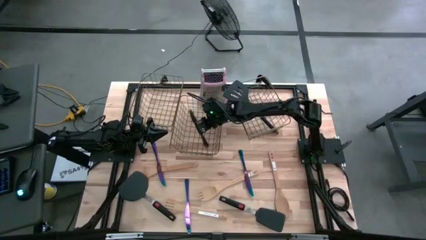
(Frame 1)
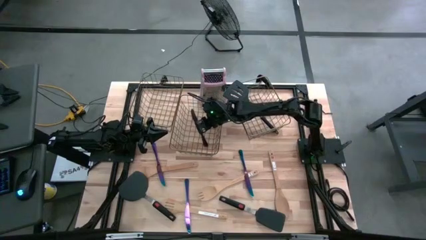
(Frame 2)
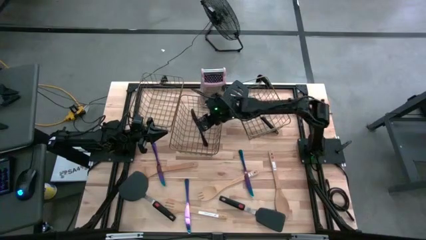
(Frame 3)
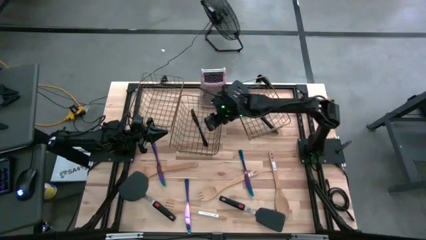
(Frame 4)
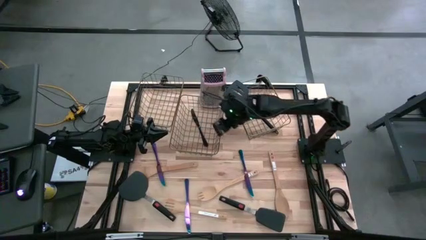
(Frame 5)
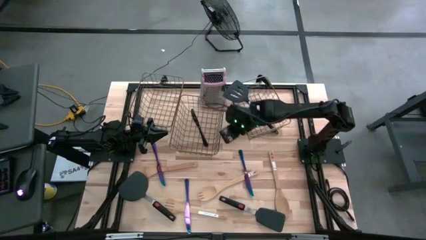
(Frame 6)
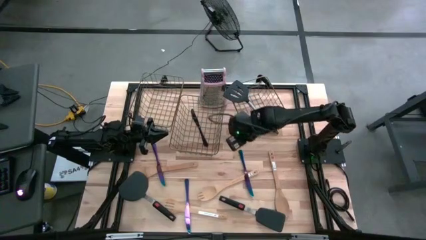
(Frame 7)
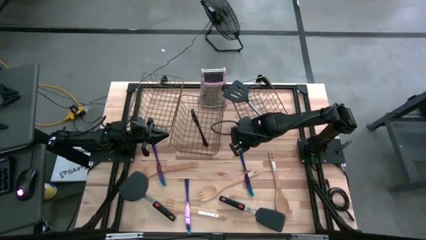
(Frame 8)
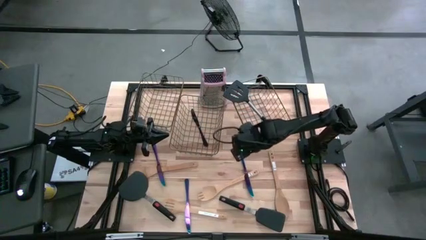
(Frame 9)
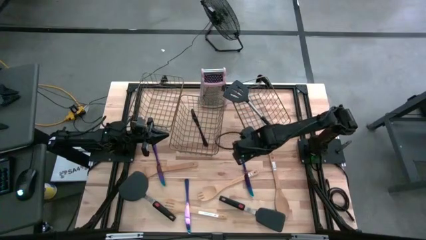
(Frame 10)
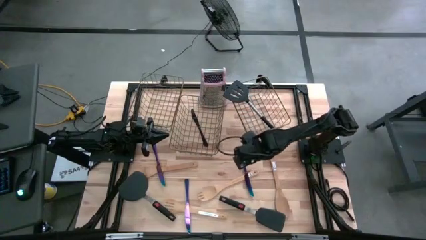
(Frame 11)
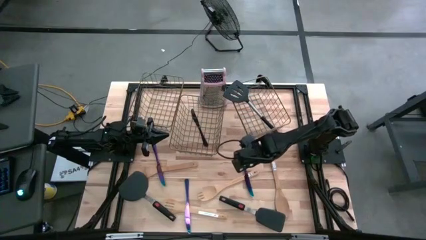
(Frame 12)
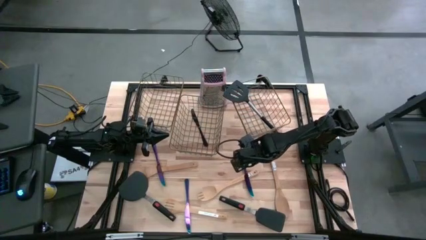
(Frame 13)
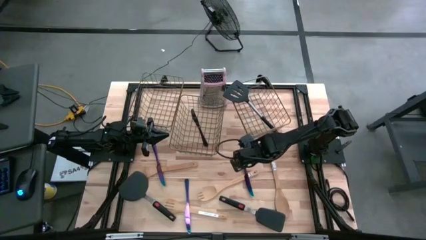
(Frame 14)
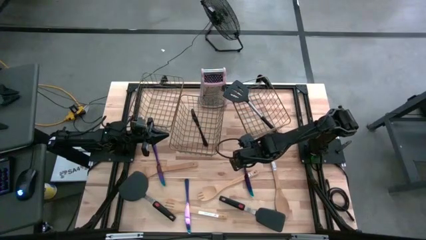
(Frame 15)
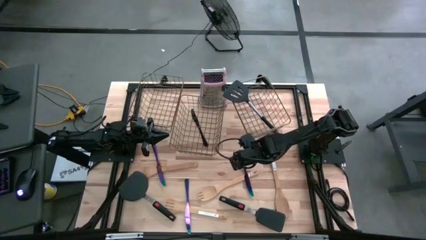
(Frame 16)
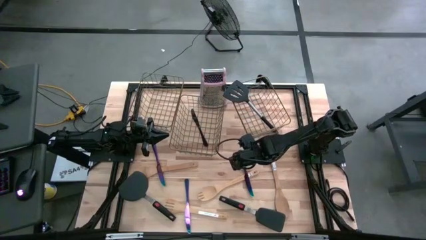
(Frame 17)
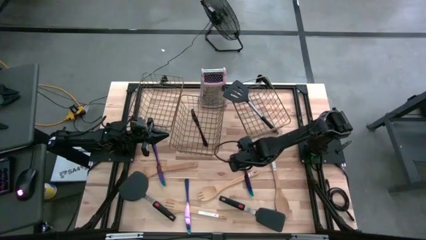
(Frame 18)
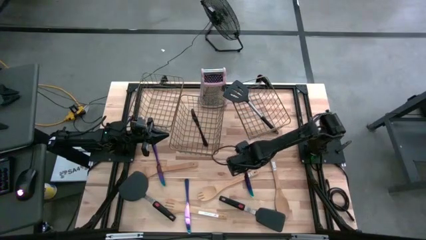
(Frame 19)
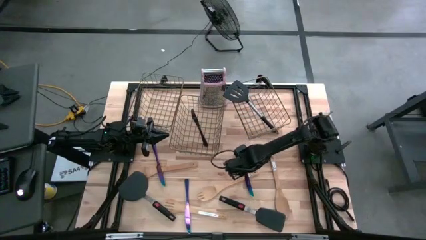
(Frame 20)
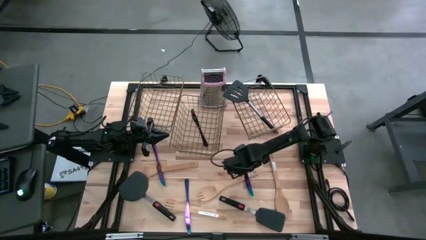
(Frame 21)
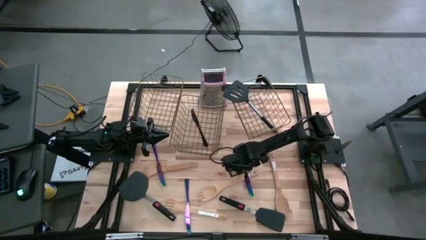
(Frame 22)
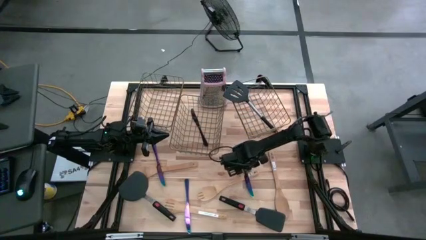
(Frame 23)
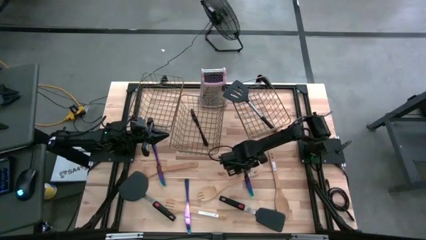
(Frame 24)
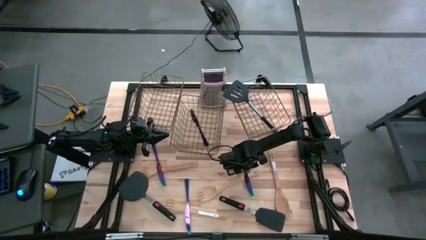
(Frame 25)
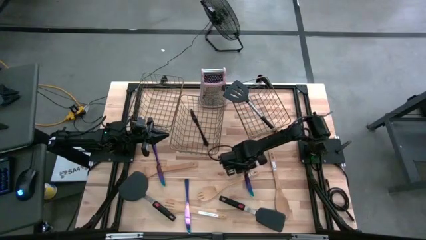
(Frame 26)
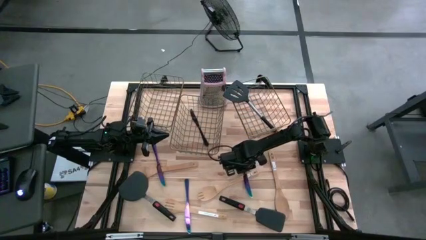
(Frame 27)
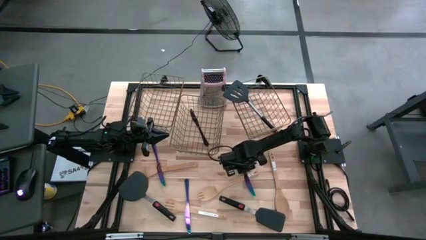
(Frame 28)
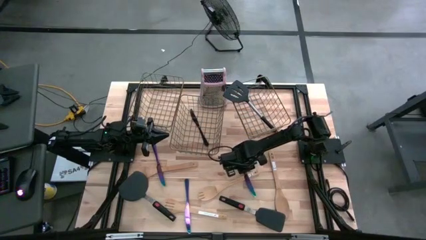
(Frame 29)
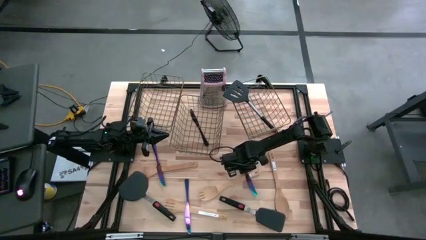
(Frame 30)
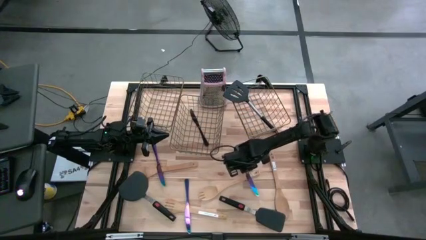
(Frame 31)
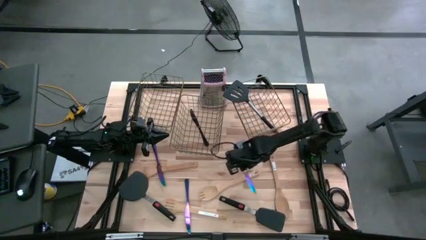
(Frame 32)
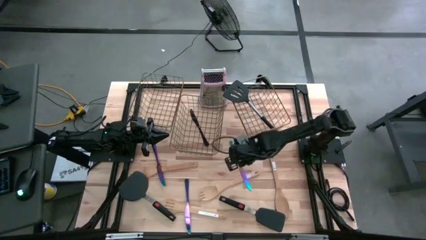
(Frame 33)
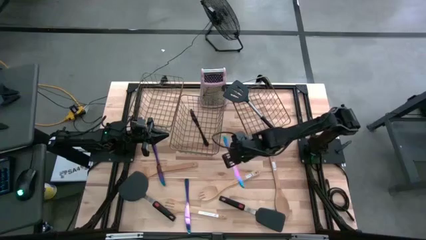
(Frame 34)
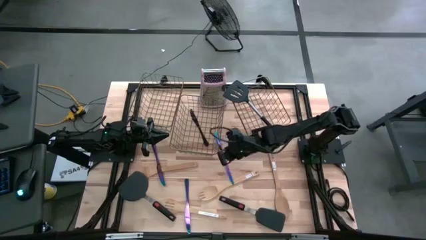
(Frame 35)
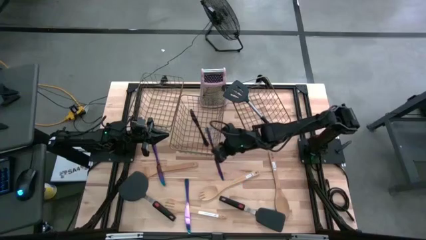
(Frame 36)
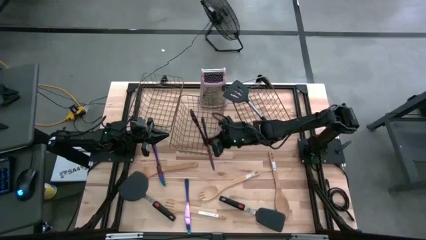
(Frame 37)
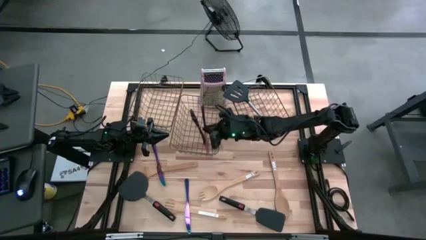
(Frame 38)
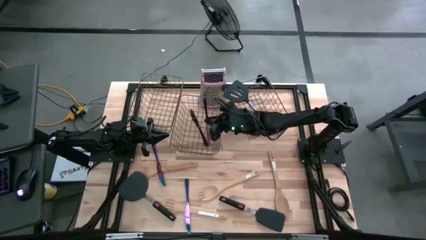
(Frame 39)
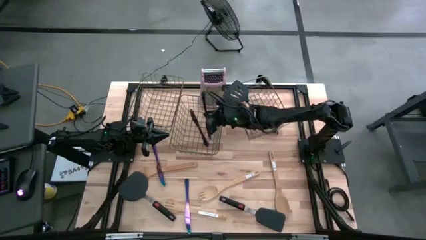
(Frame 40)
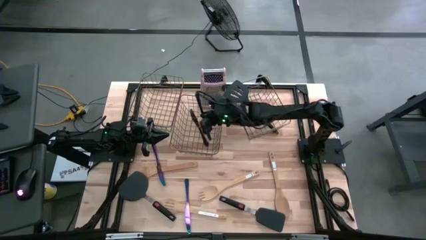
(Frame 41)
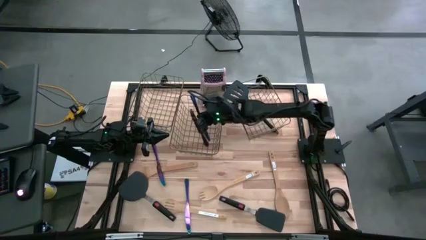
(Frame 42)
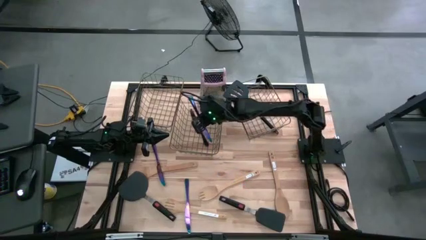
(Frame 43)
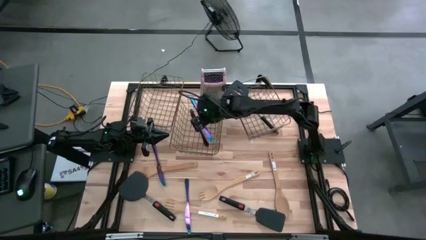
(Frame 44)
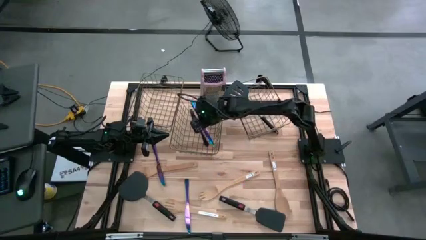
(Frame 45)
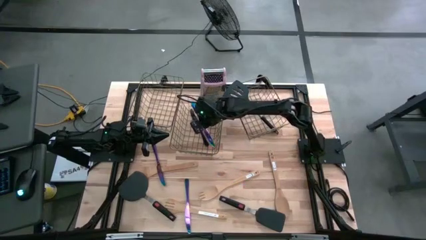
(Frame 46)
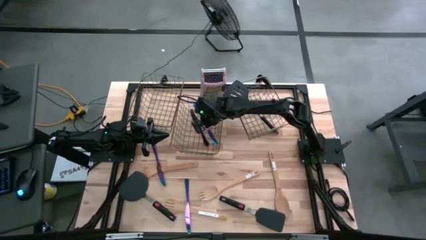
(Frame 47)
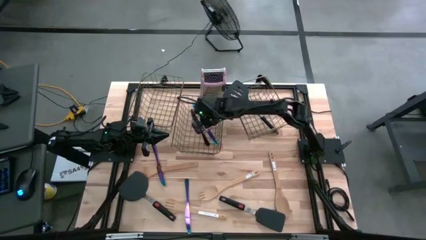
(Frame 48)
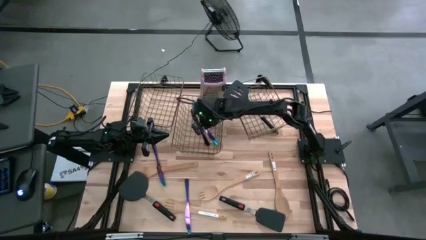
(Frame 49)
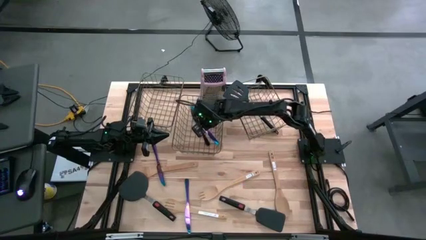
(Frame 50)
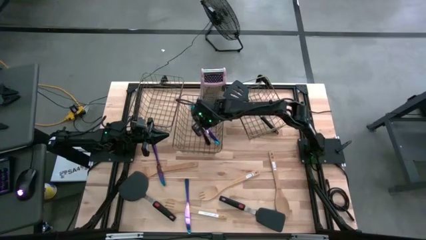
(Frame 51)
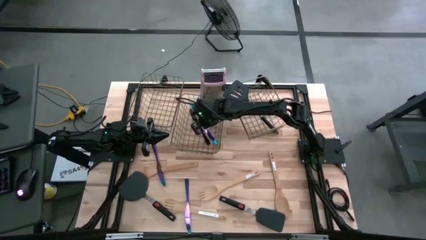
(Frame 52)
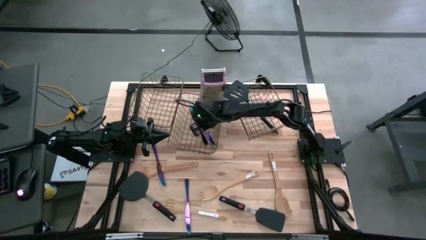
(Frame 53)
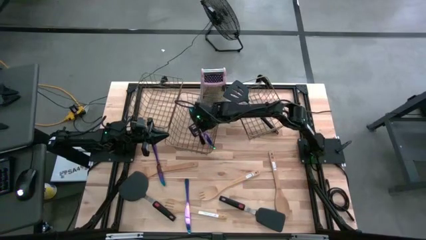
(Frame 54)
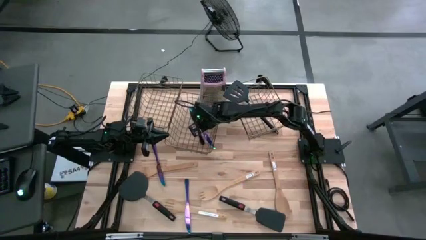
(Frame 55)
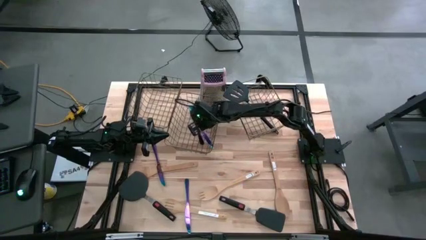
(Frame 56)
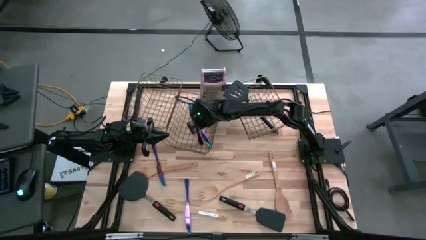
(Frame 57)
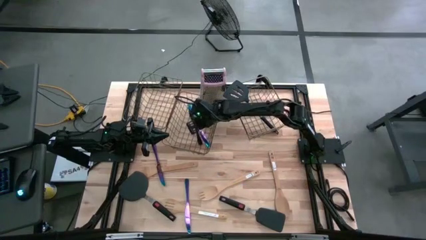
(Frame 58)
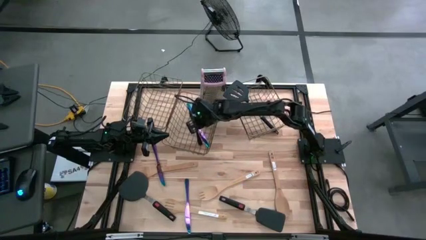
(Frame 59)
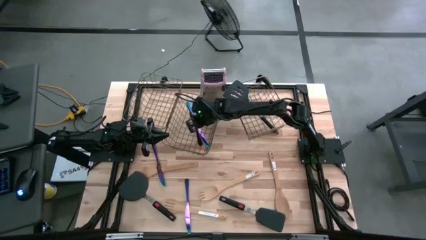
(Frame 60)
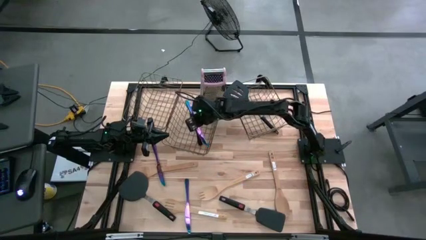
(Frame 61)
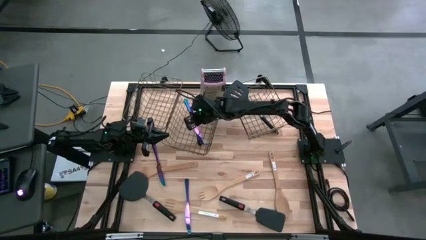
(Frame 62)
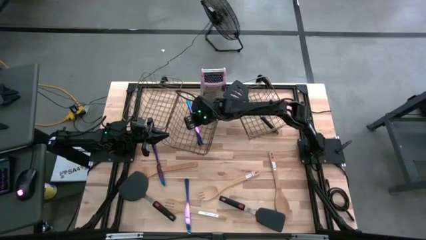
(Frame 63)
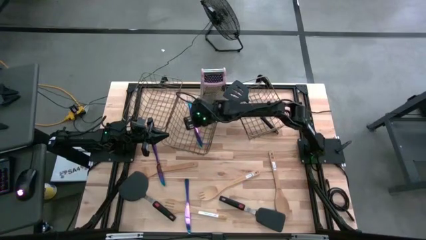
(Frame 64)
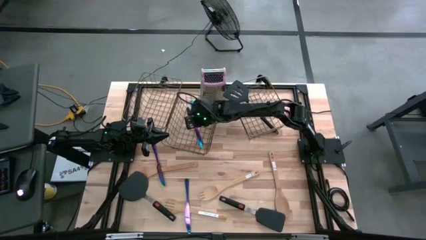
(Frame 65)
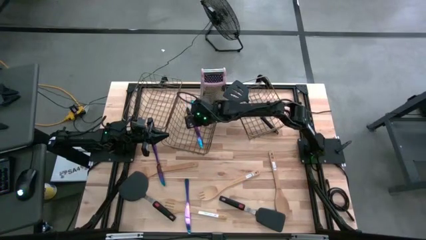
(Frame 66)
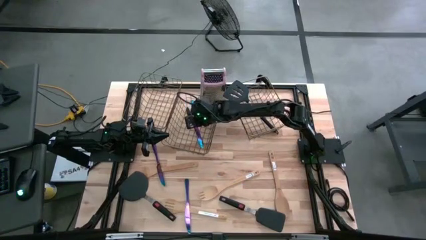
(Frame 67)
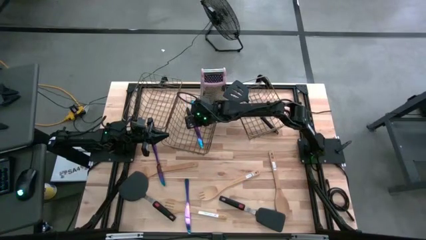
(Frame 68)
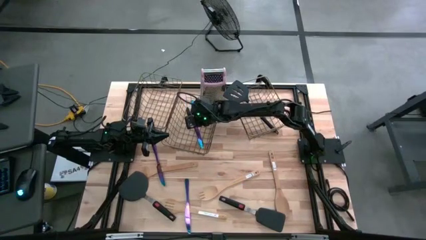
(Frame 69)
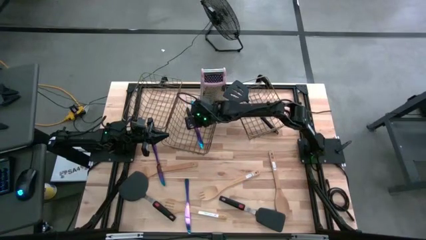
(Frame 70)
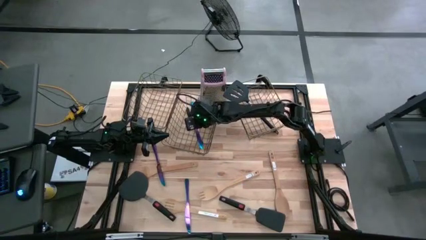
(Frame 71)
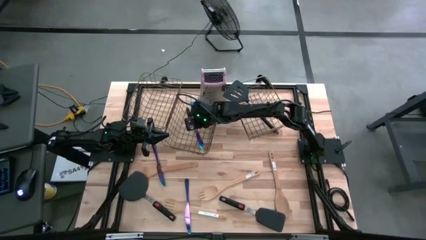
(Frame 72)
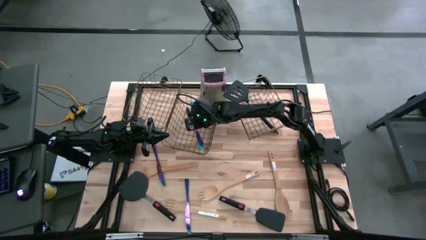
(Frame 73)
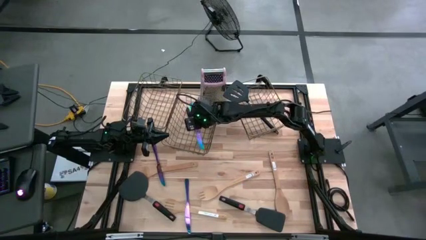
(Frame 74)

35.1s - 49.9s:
Task: Pick & Place Kitchen Items
Put the right blue table knife into the middle wire basket

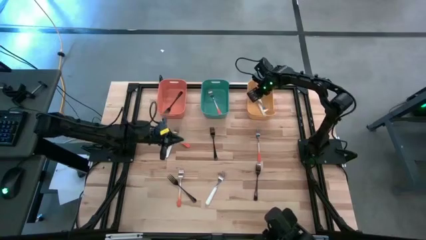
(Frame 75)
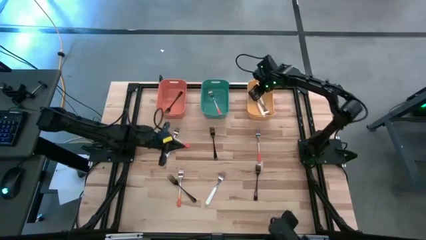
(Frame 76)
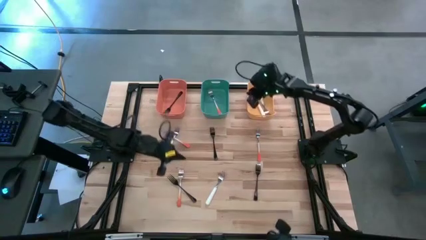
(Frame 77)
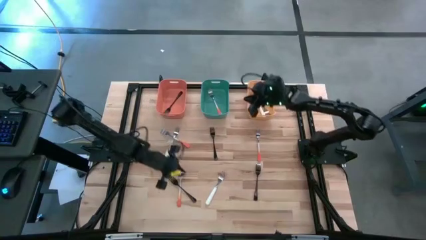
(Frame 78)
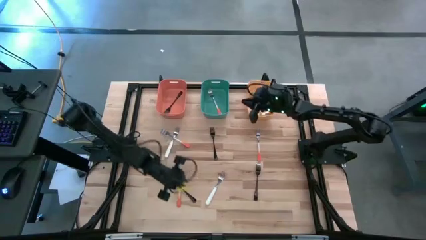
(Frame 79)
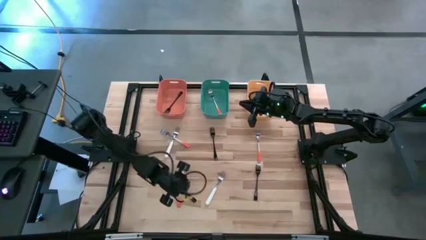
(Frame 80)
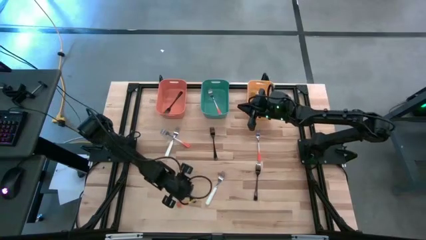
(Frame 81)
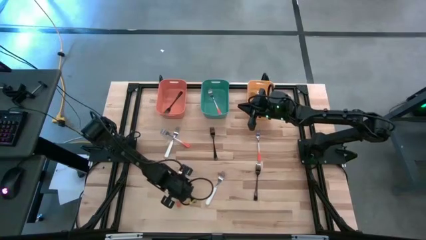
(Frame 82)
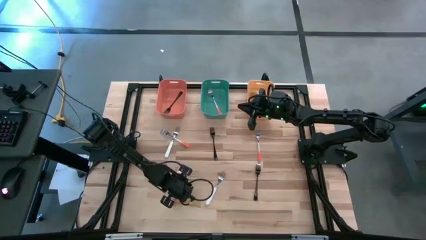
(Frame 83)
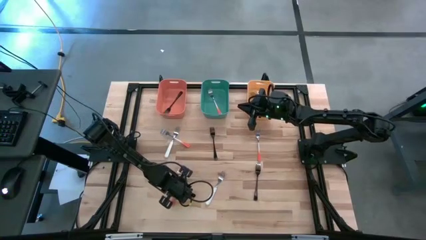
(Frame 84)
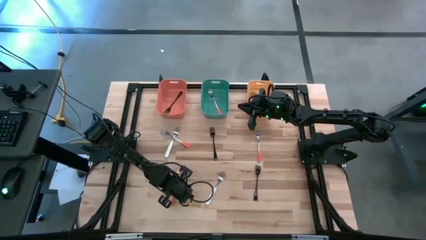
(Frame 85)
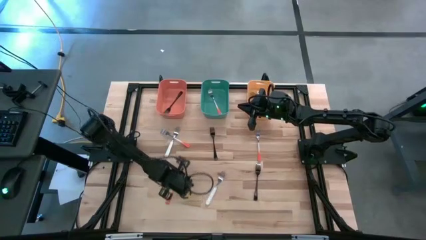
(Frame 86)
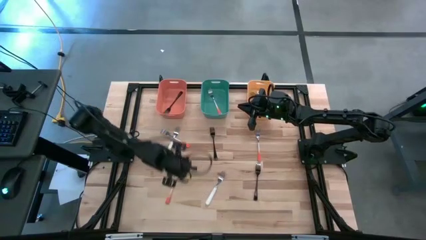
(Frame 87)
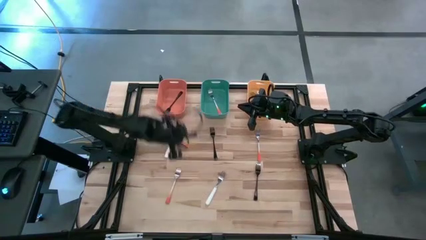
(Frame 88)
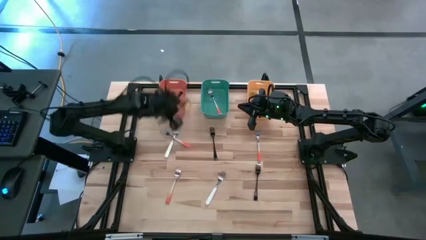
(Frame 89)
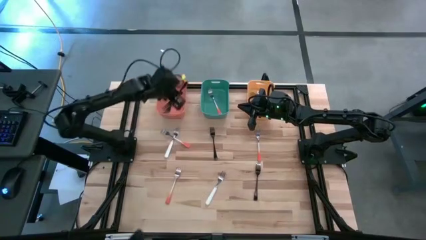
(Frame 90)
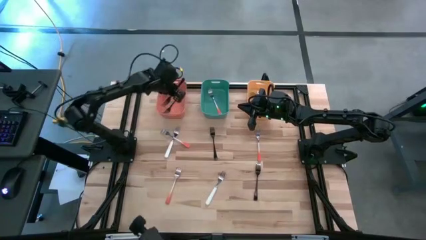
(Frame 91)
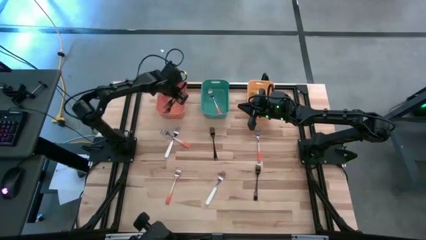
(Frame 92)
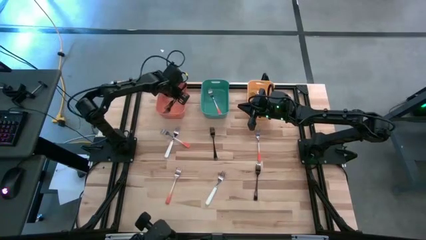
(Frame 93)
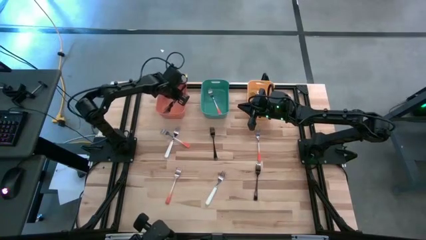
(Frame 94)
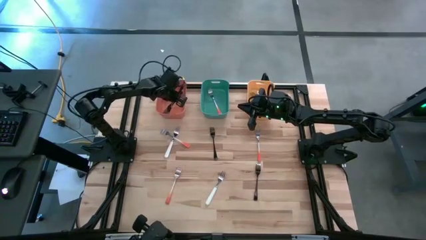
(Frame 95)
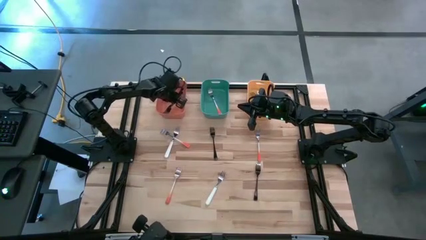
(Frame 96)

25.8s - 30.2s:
Task: Sort silverware by color (type)
Put the bottom left black fork into the orange bin
